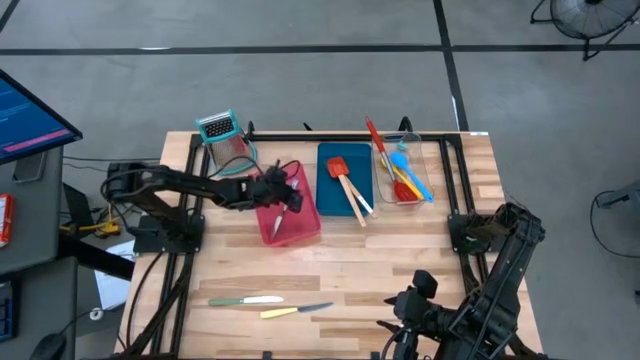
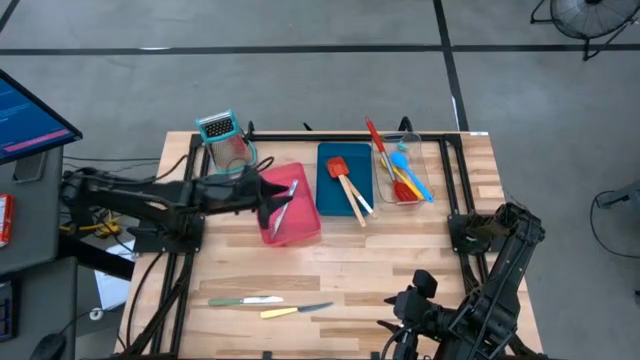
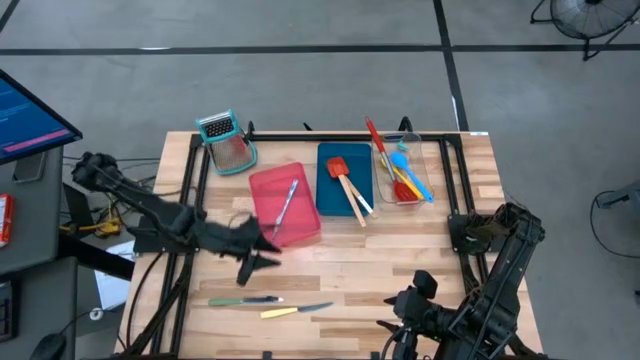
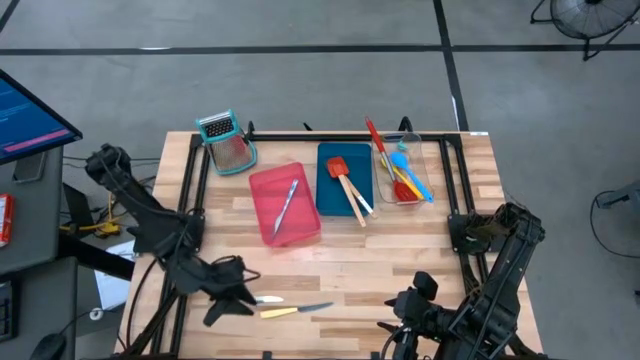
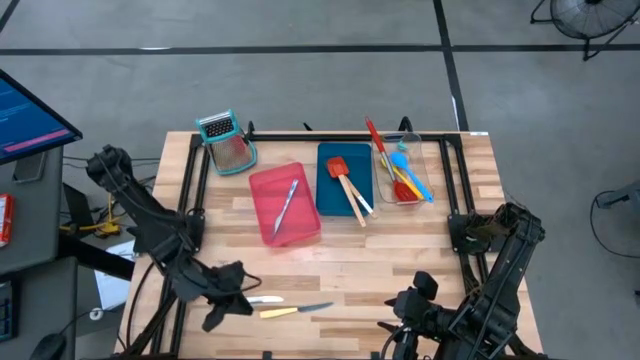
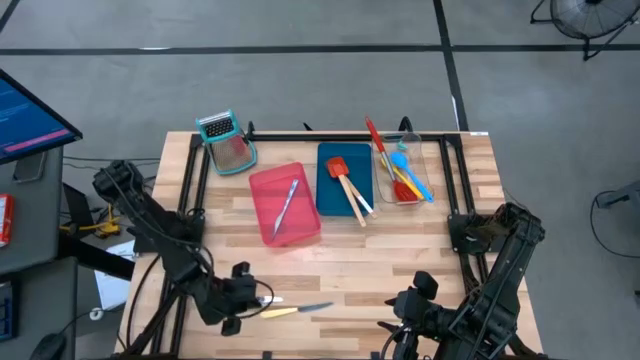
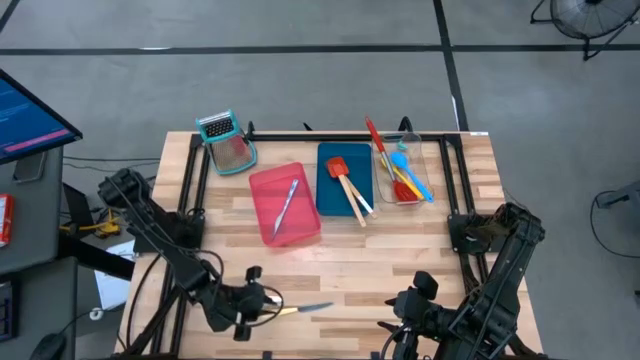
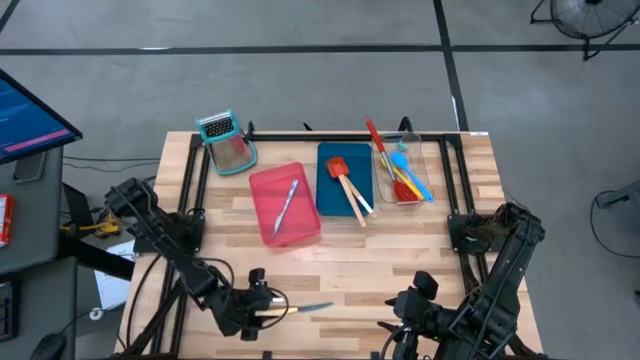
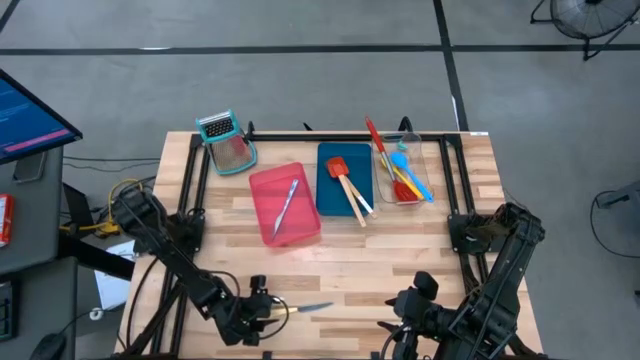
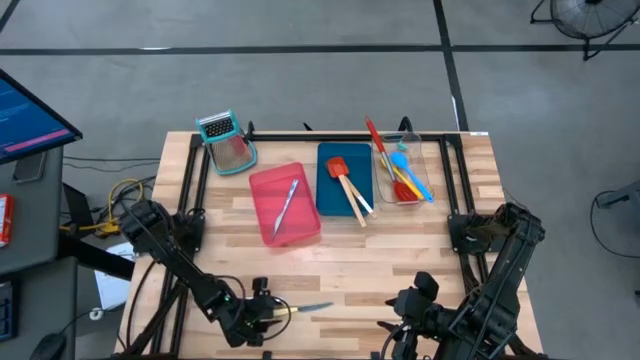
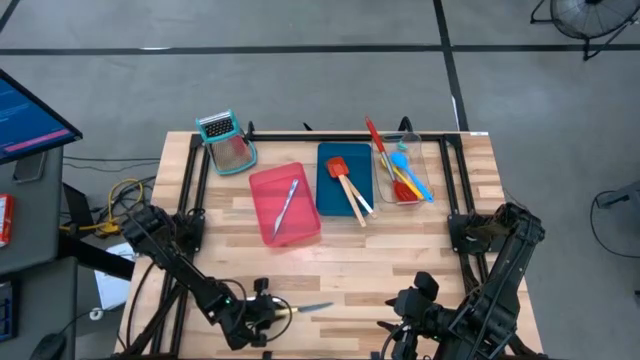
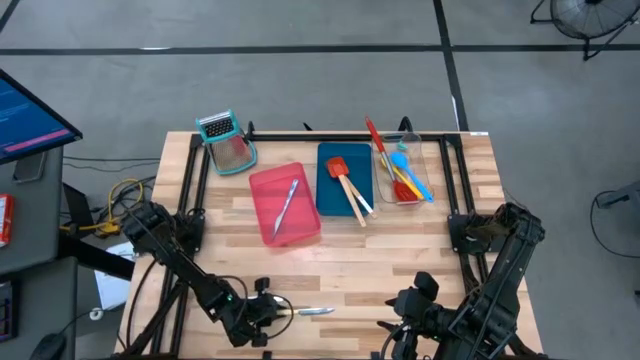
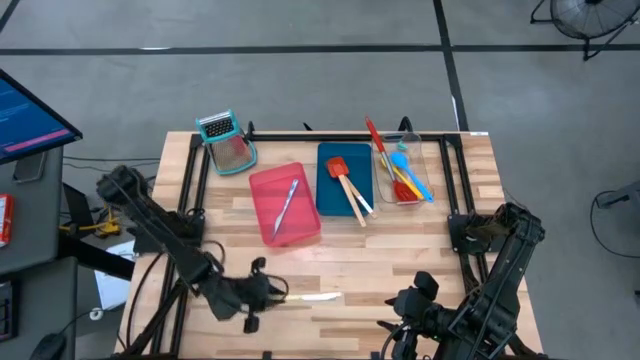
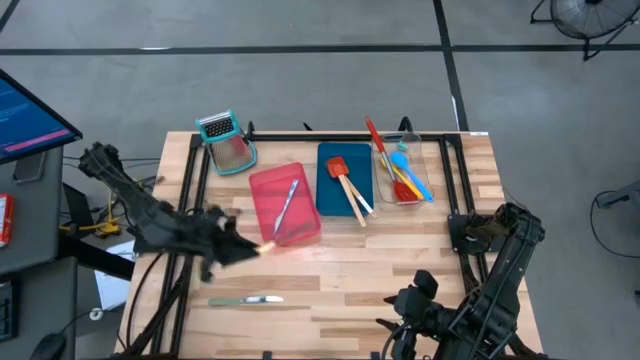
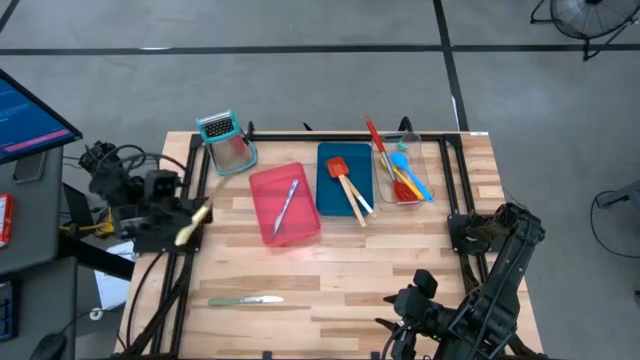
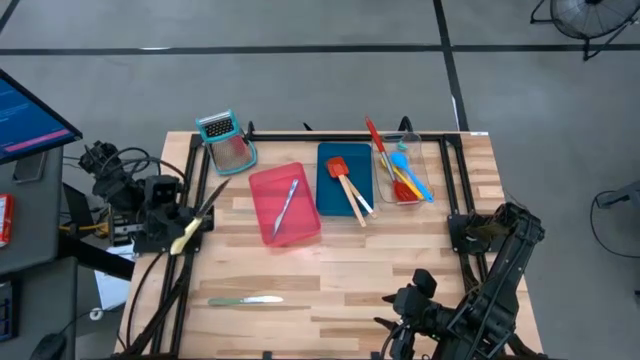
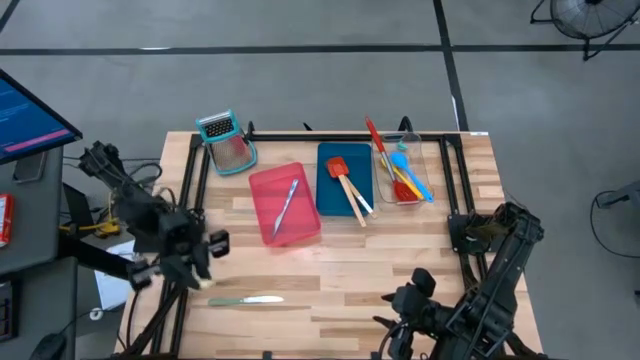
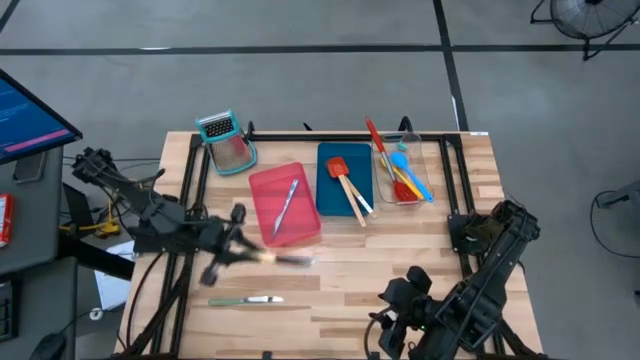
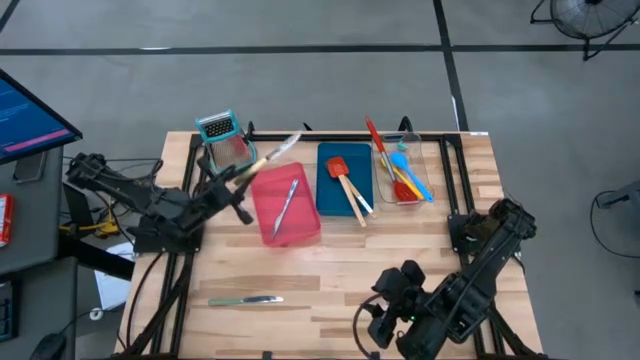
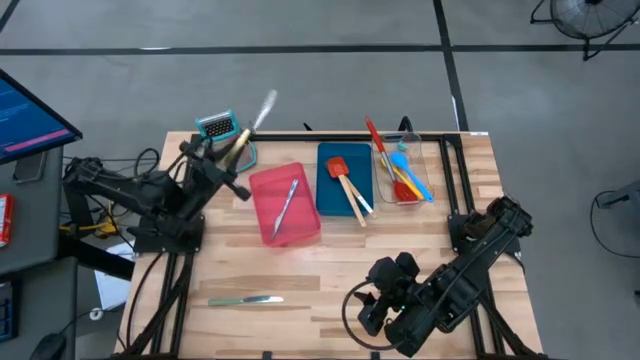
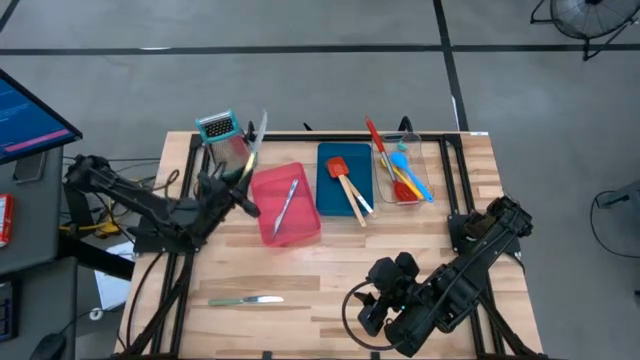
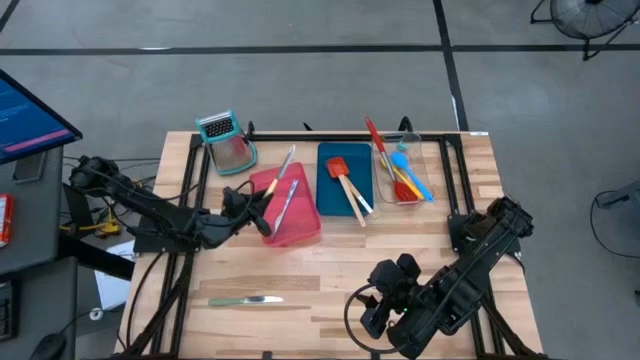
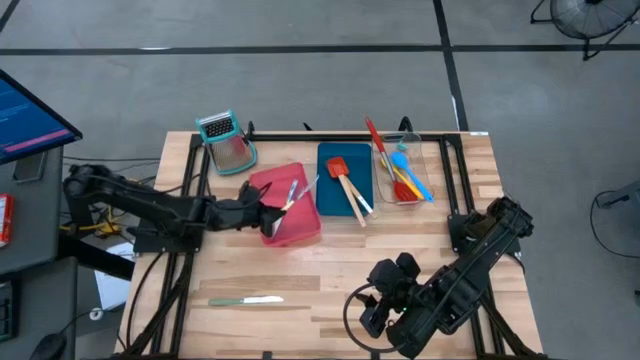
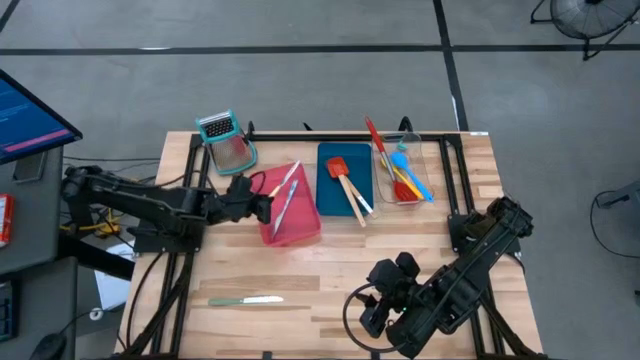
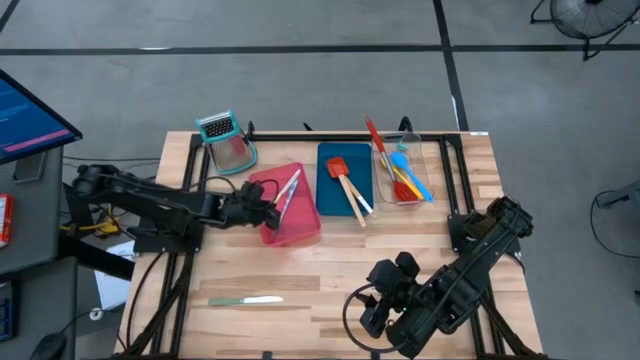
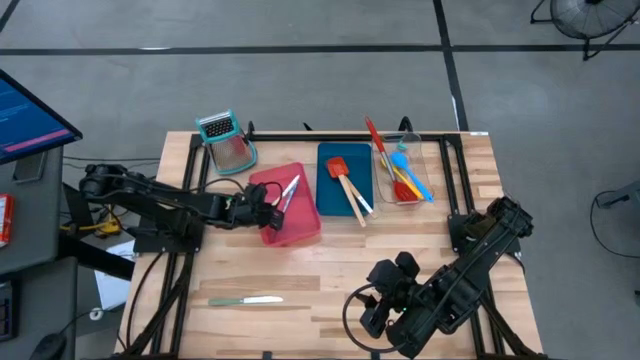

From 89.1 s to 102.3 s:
Task: Pick & Place Kitchen Items
Put the yellow table knife into the red bin

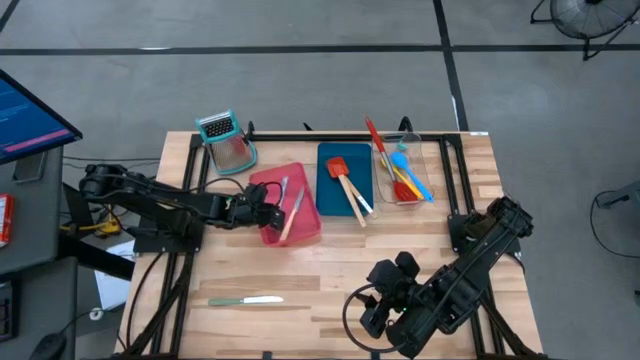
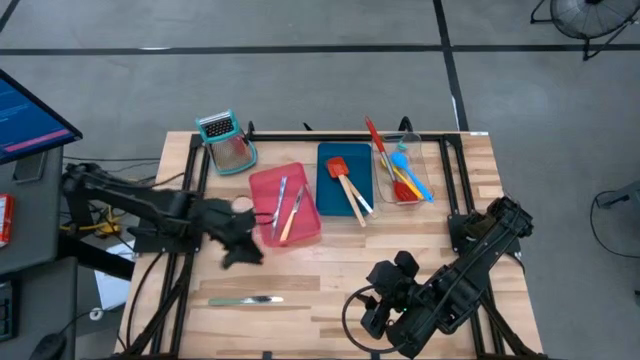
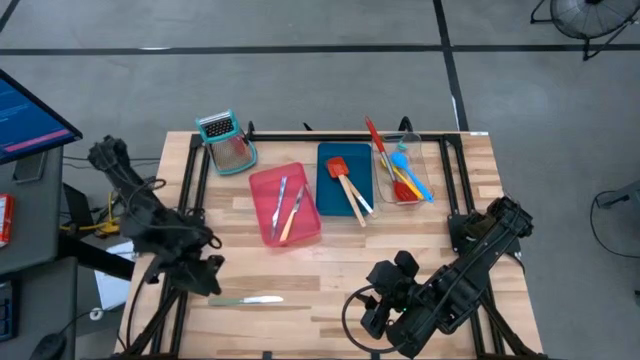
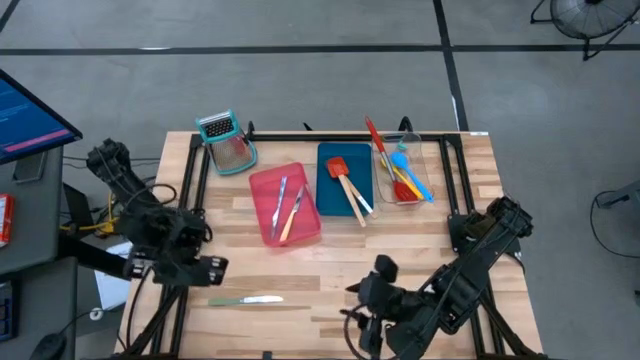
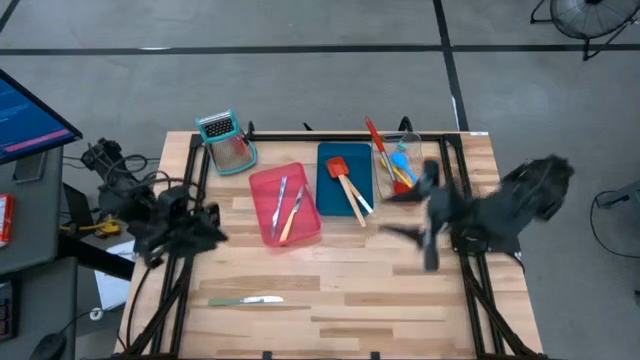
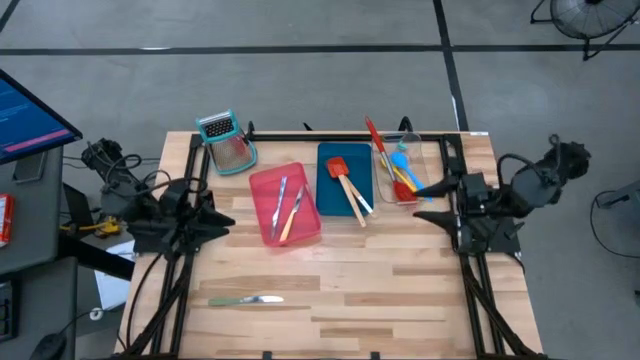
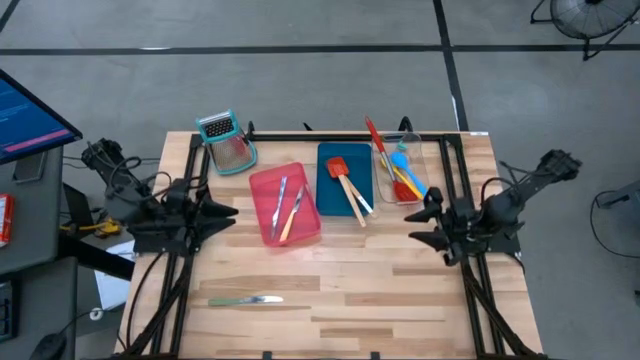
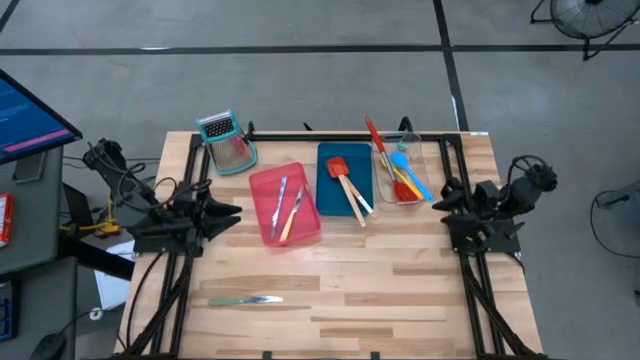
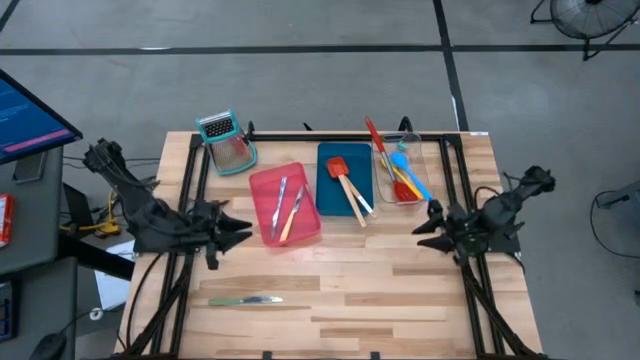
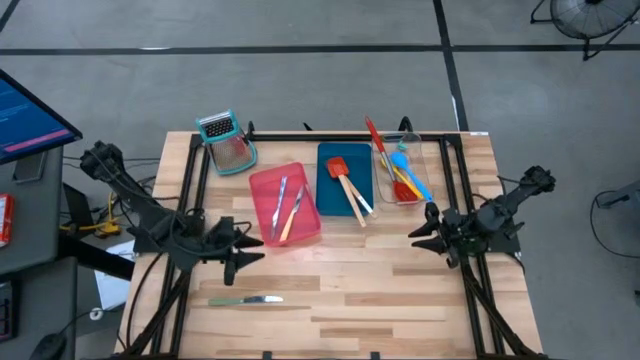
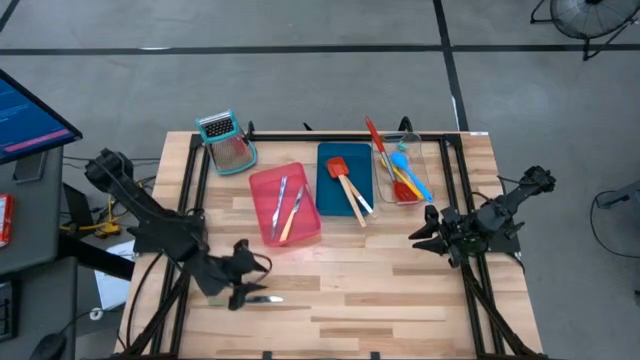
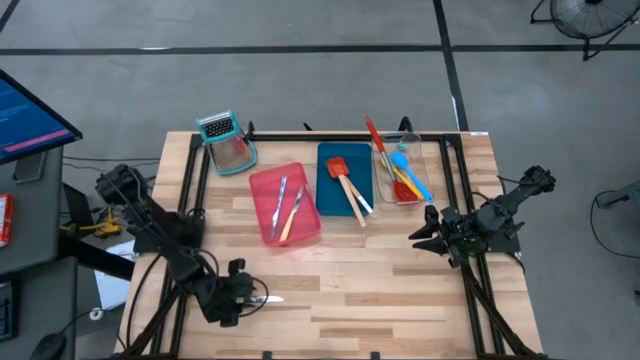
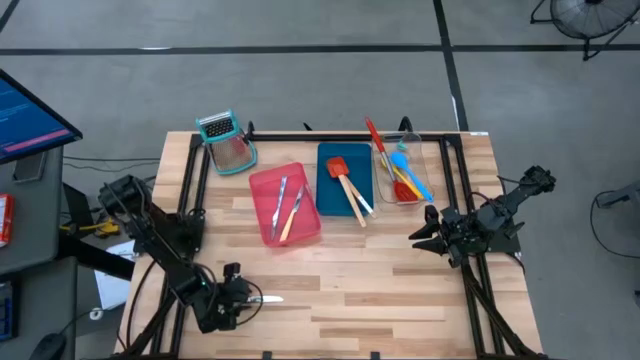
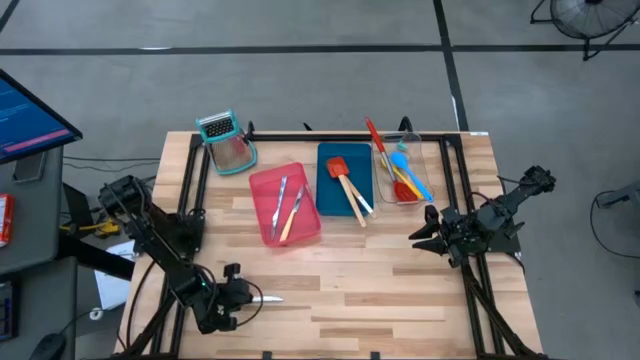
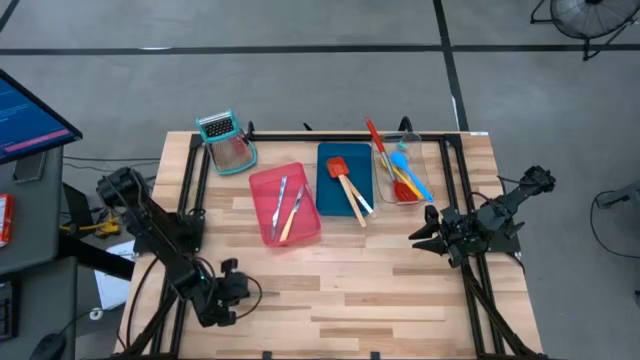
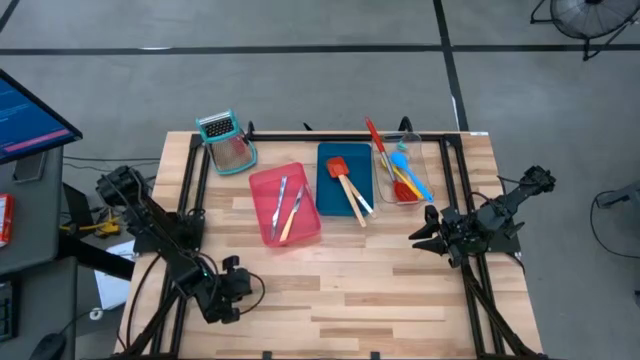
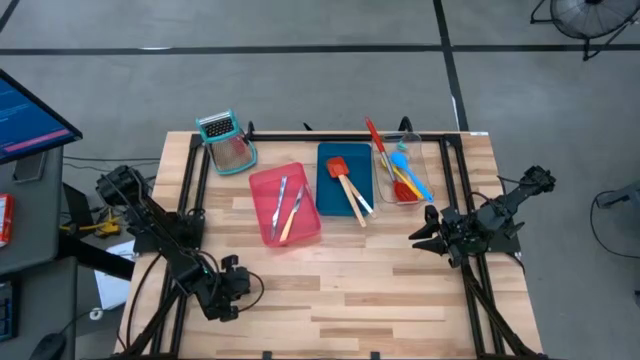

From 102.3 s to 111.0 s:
Put the green table knife into the red bin
